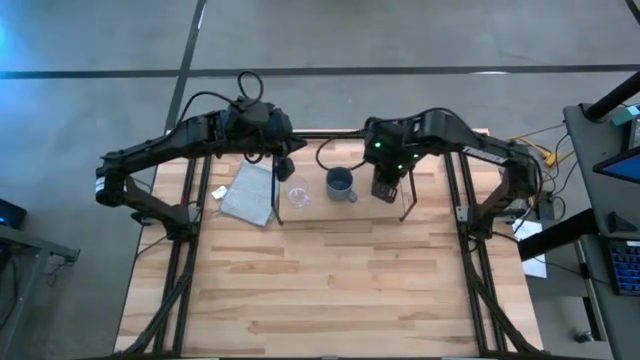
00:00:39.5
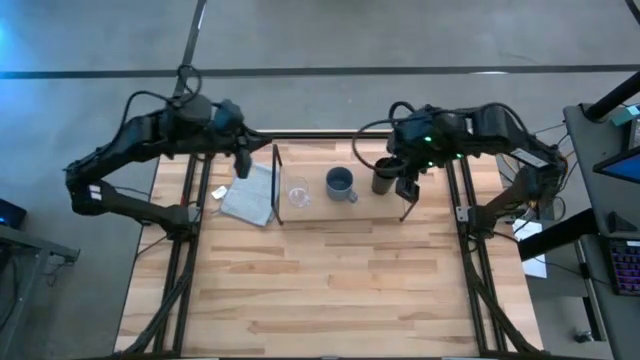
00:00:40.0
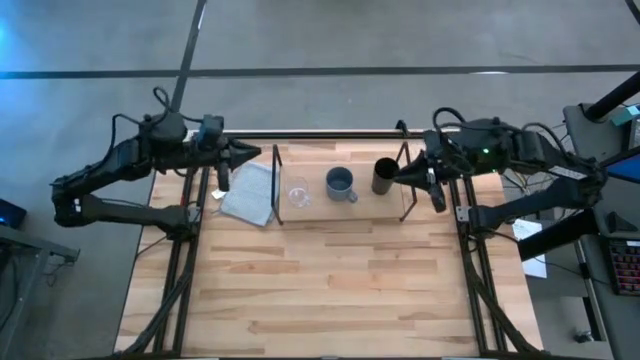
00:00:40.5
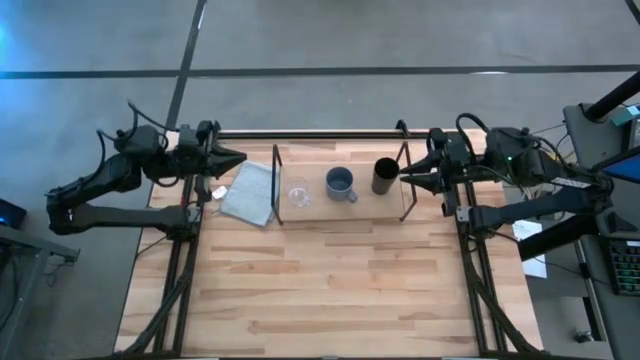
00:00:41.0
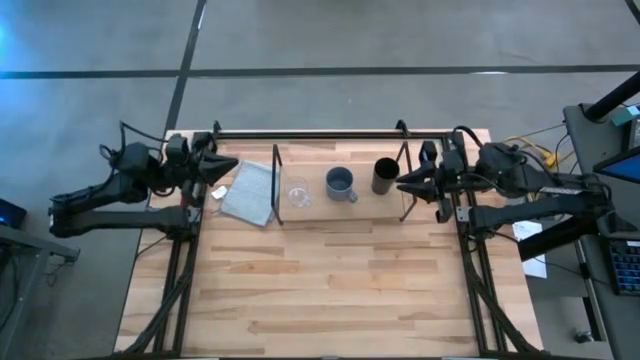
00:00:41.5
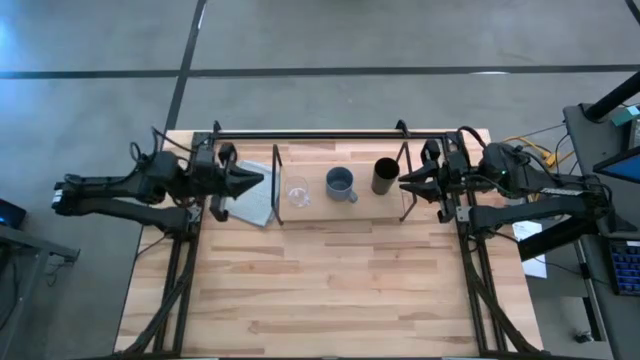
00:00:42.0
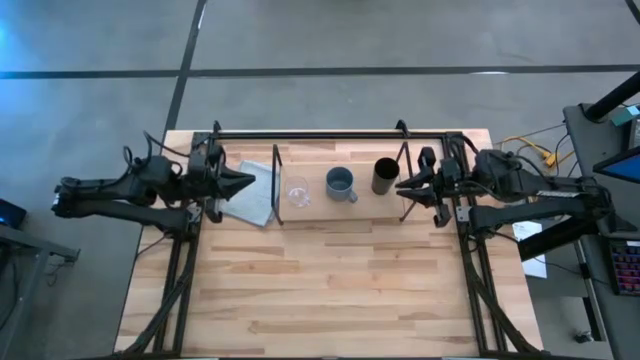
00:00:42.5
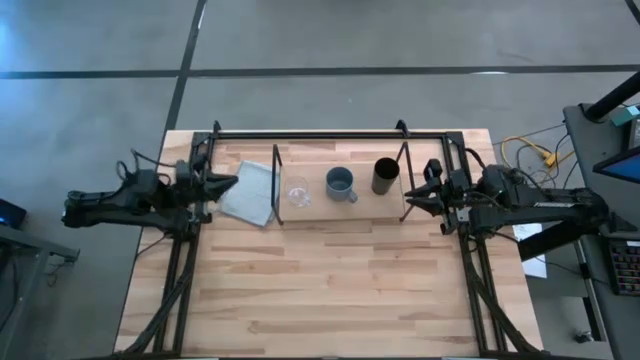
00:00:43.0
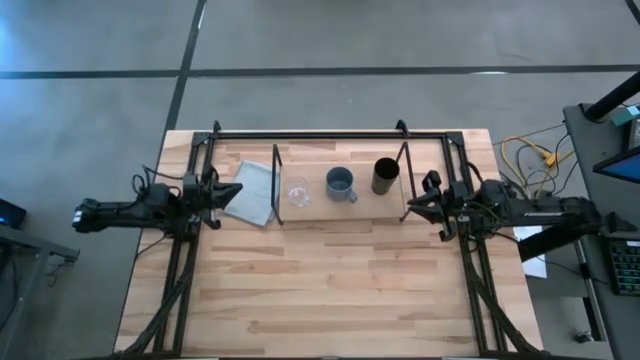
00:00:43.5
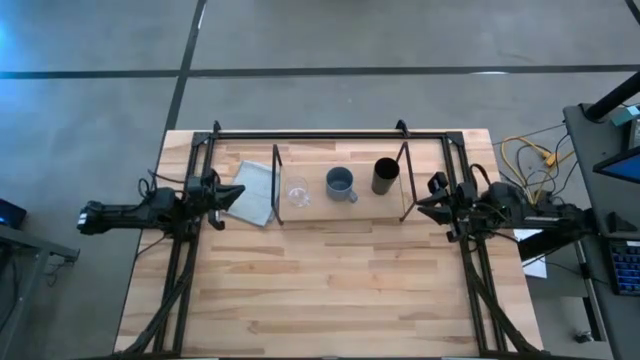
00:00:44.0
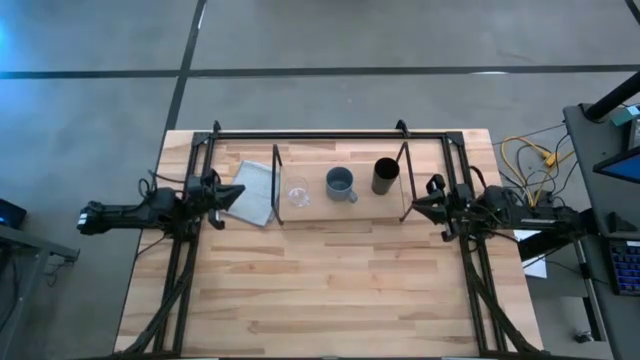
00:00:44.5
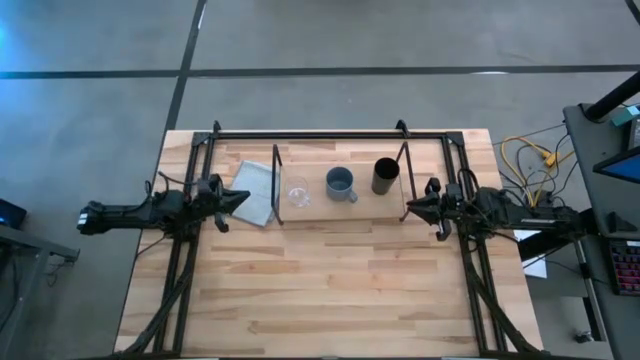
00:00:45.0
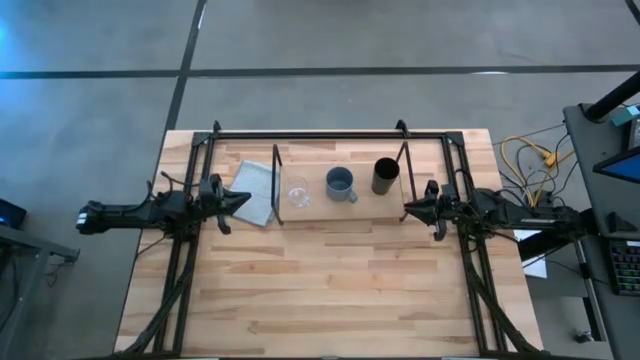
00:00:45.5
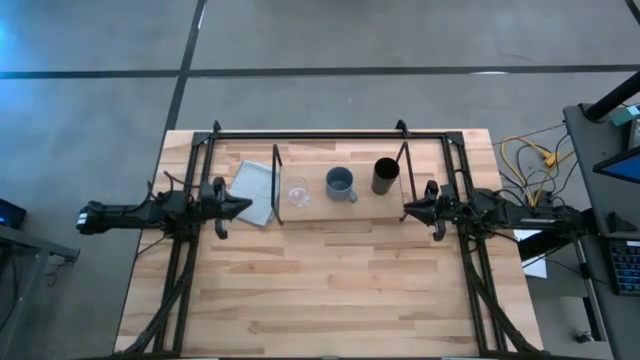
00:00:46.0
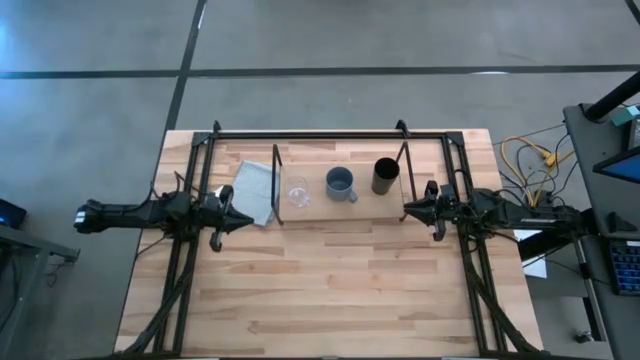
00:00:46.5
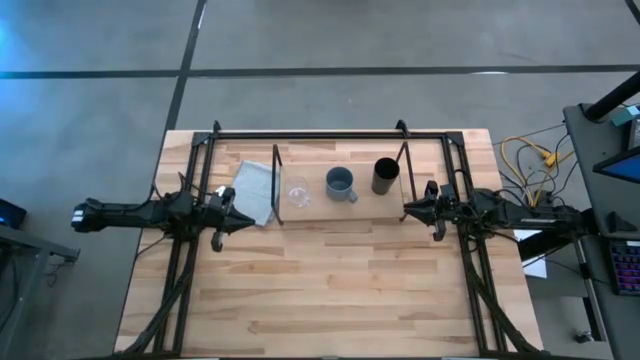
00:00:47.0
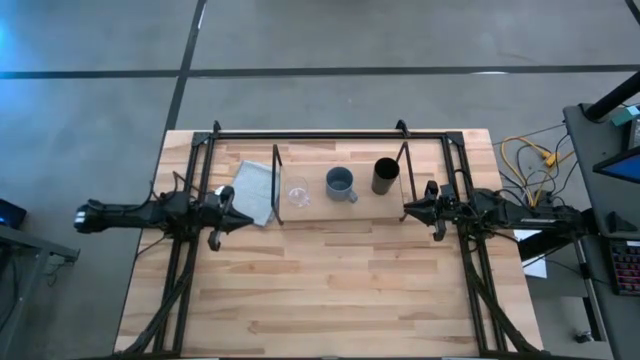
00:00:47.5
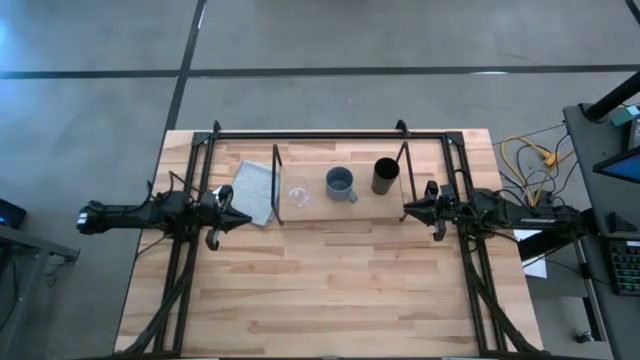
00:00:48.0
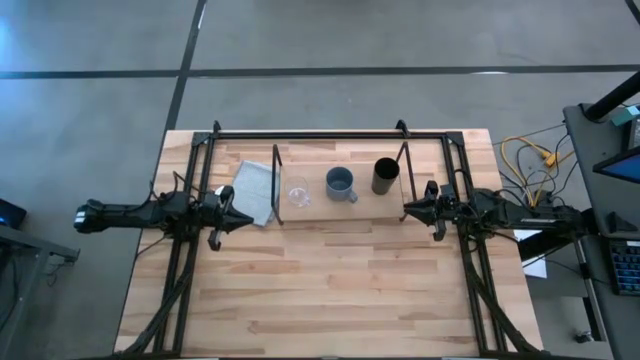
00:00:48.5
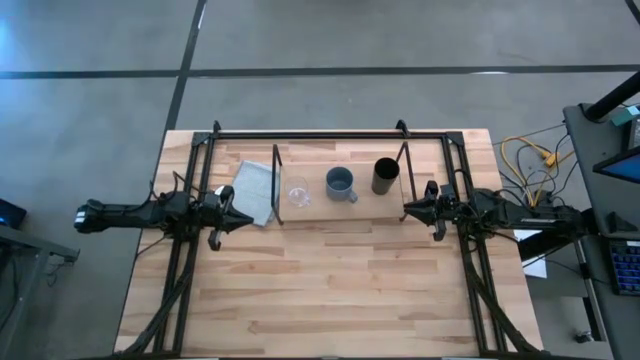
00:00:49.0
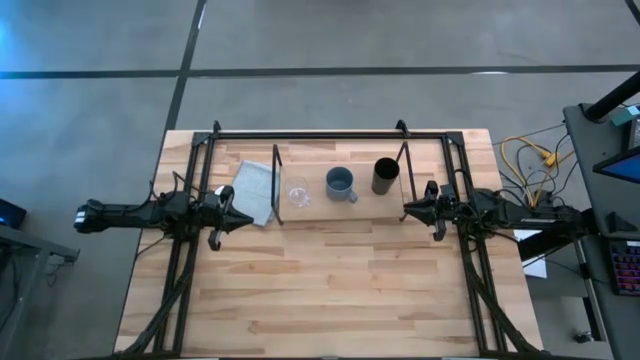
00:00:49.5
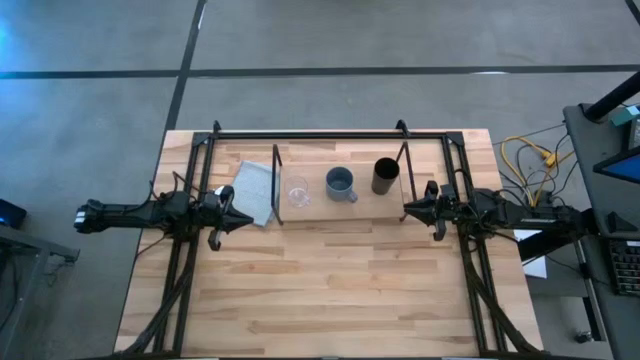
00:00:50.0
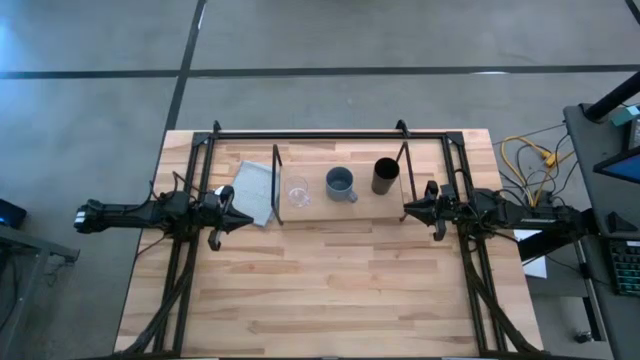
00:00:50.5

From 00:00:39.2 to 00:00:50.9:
Task: Stack small to large cups/mugs on shelf
Return to Home Position

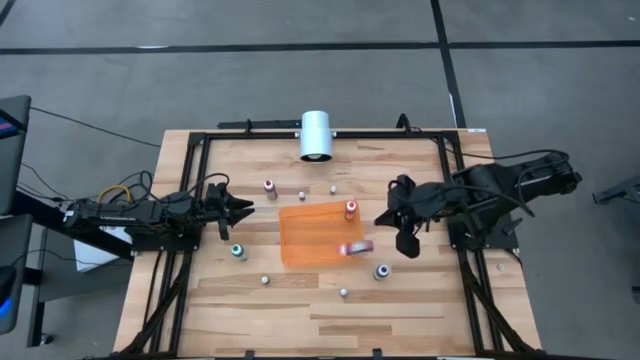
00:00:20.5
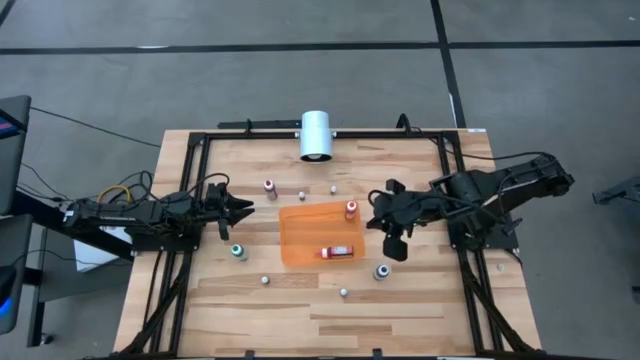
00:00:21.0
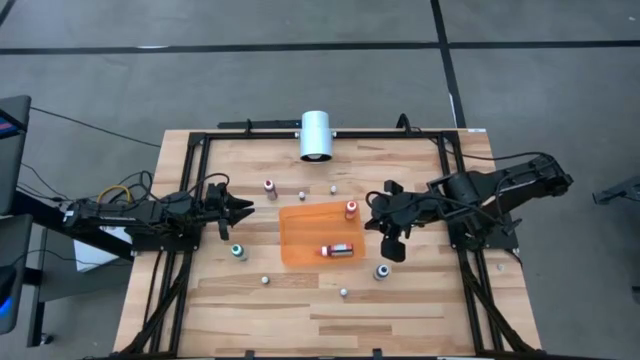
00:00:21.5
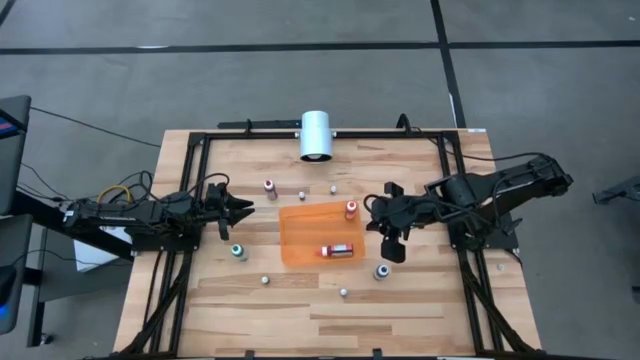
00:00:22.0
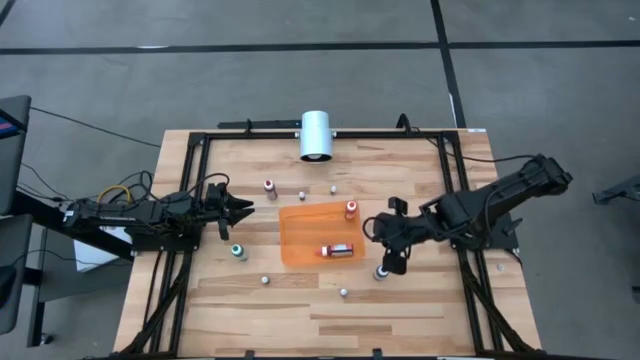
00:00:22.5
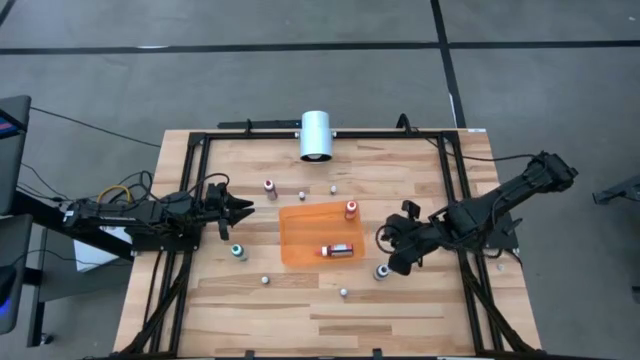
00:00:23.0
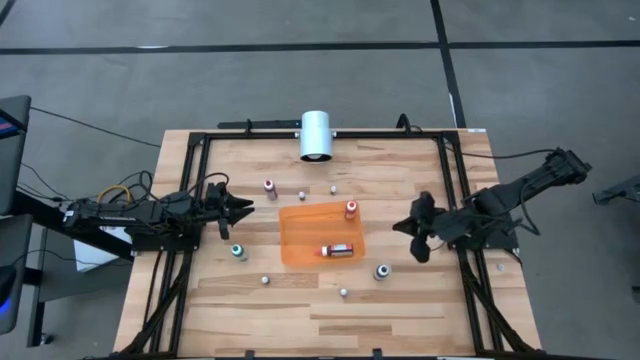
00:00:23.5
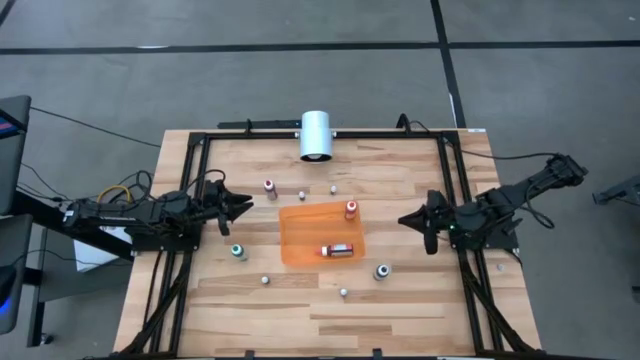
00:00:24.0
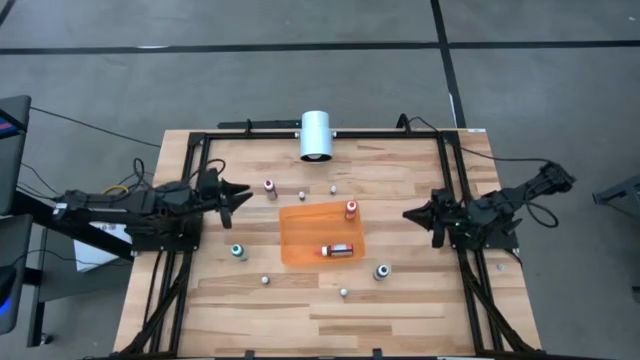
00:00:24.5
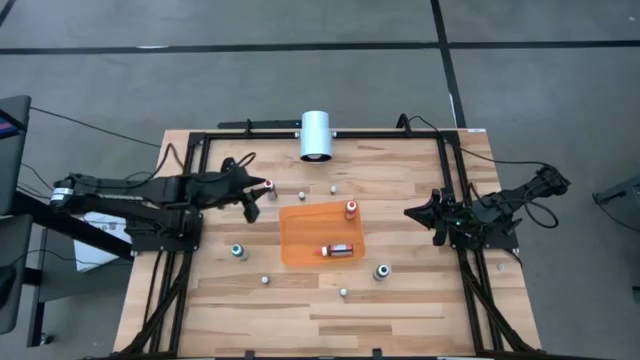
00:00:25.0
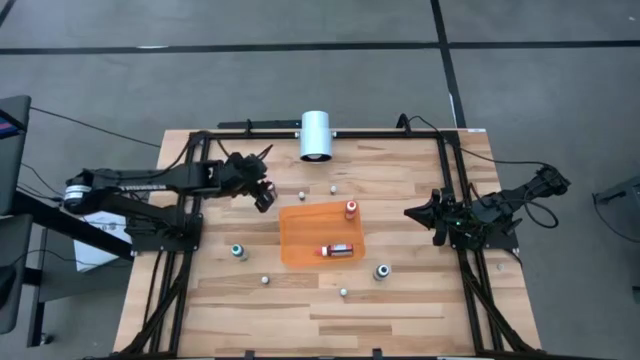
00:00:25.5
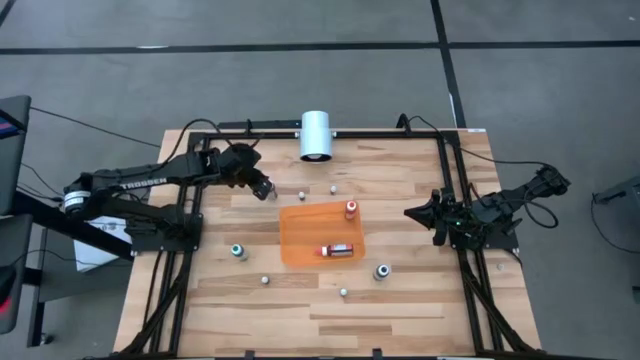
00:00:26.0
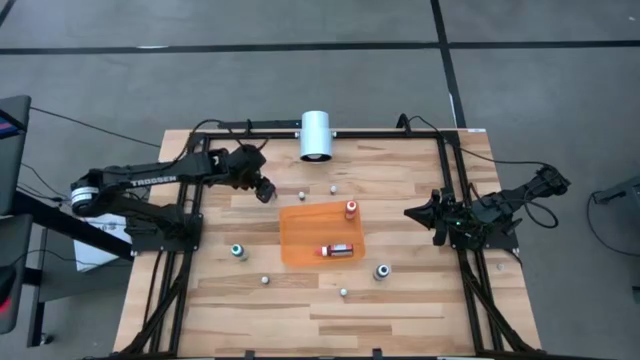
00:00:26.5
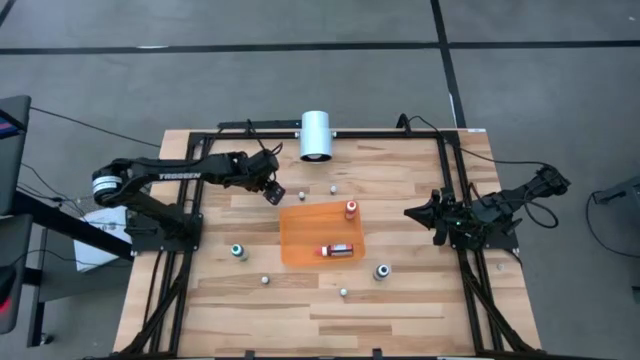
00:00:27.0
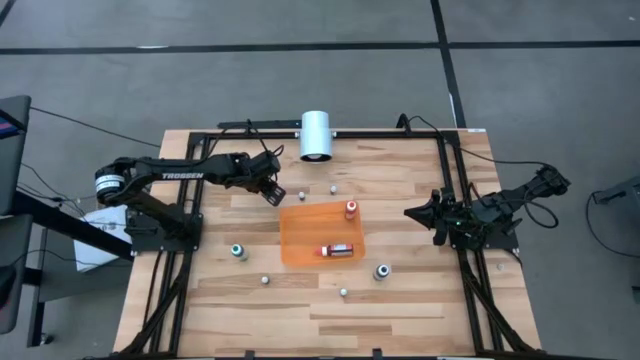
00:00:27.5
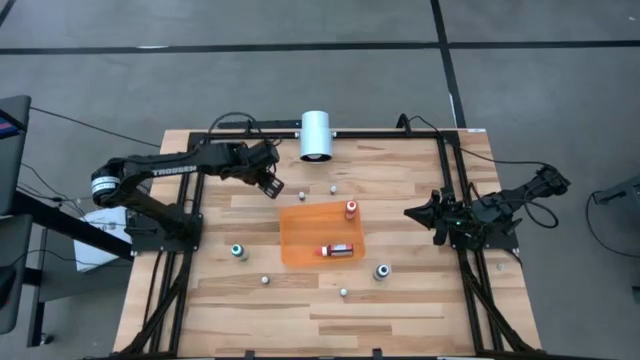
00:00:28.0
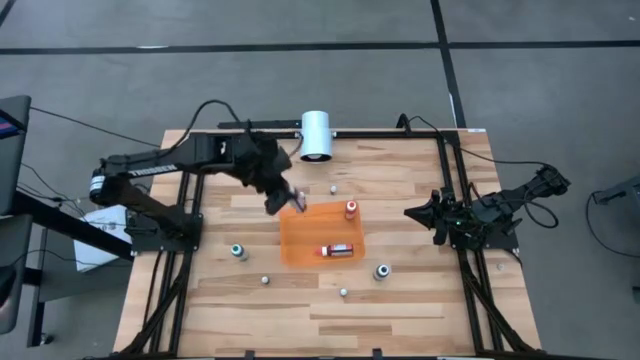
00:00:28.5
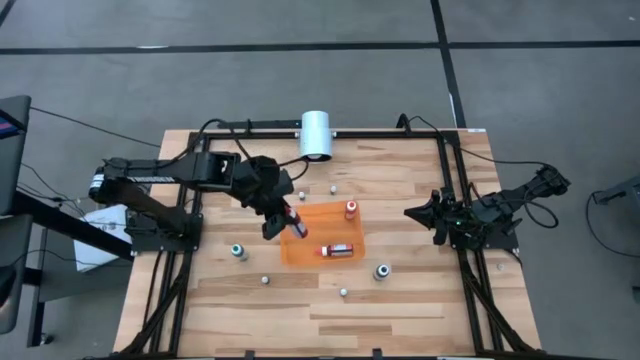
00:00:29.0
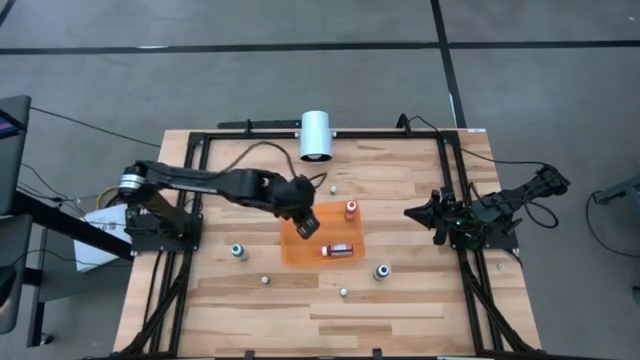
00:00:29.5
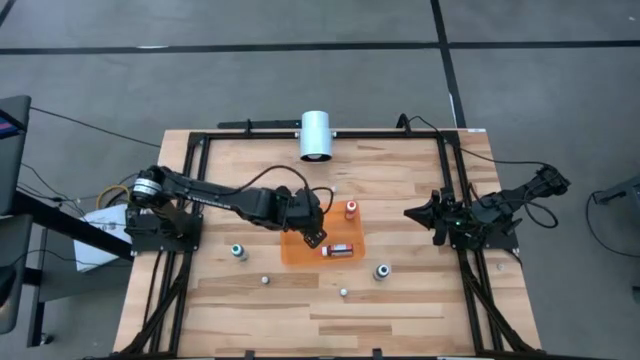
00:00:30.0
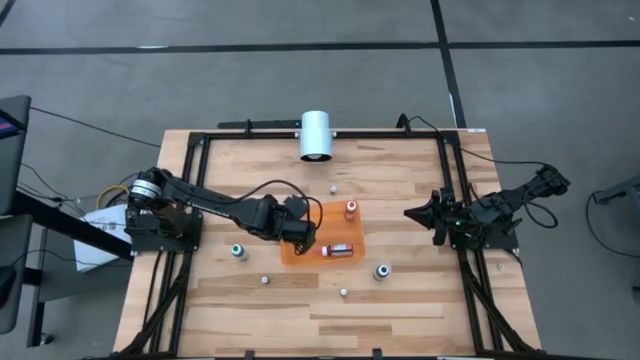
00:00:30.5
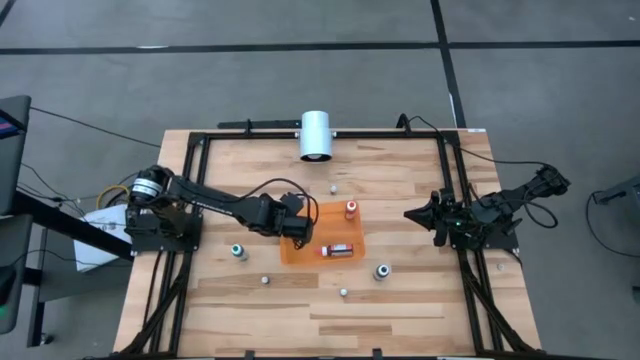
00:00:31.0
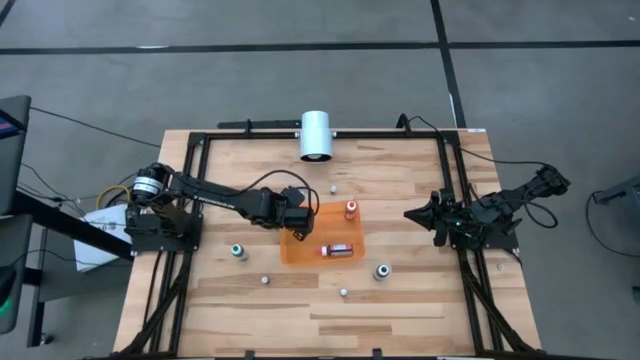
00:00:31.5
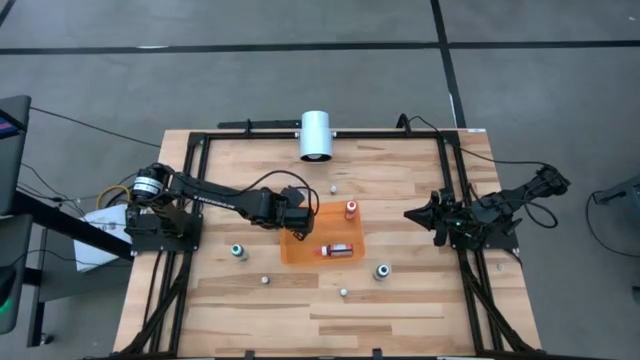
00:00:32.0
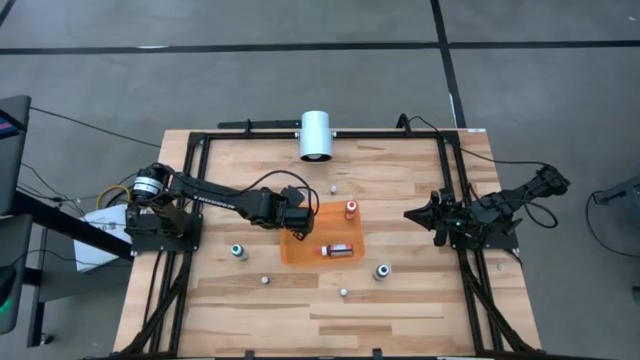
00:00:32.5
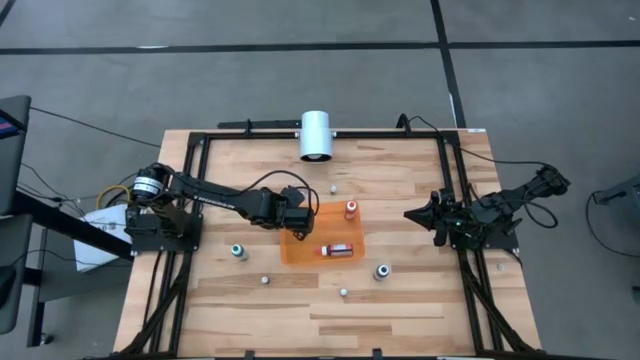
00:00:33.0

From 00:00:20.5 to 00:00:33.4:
Task: Pick & Place food coloring
Put the large red food coloring bottle into the orange container
